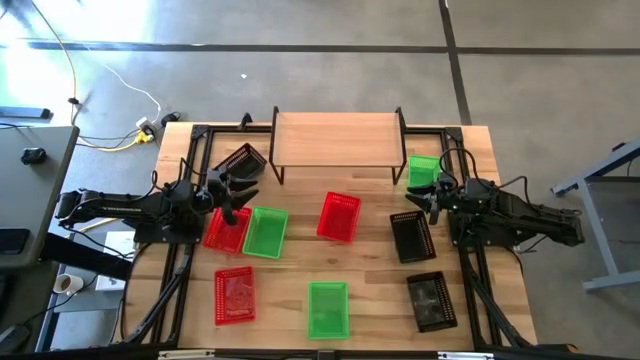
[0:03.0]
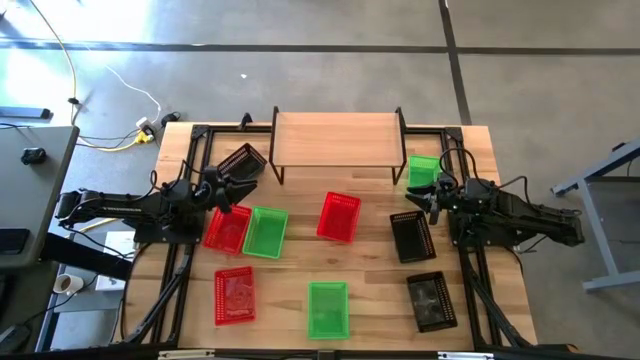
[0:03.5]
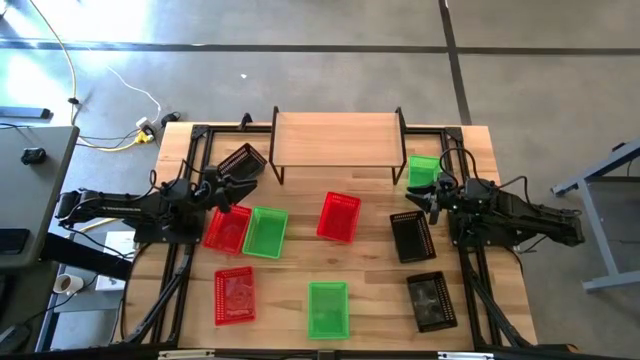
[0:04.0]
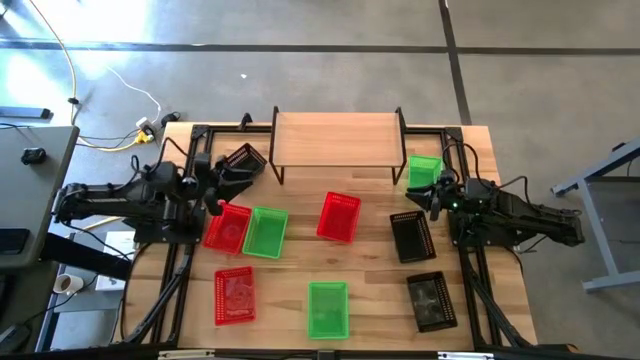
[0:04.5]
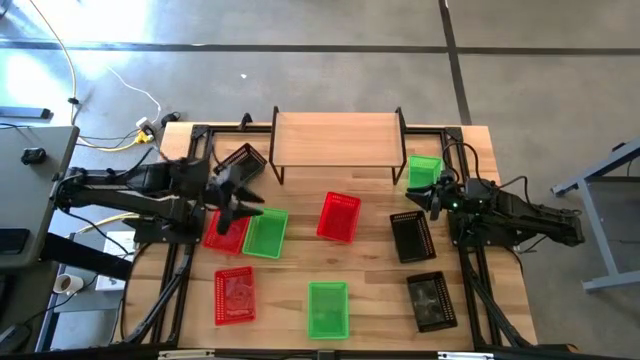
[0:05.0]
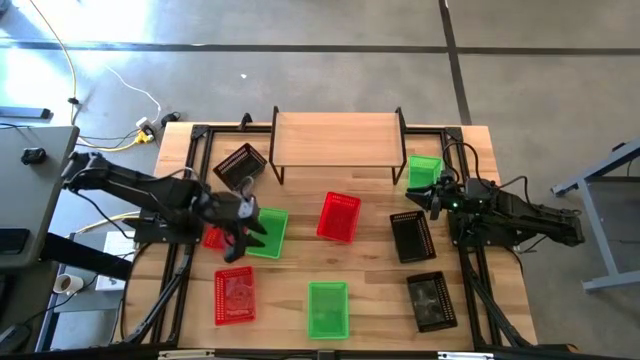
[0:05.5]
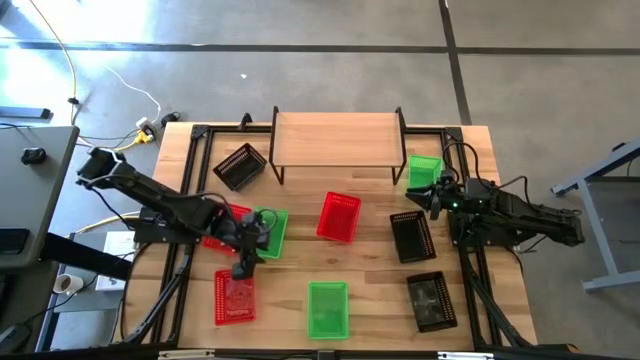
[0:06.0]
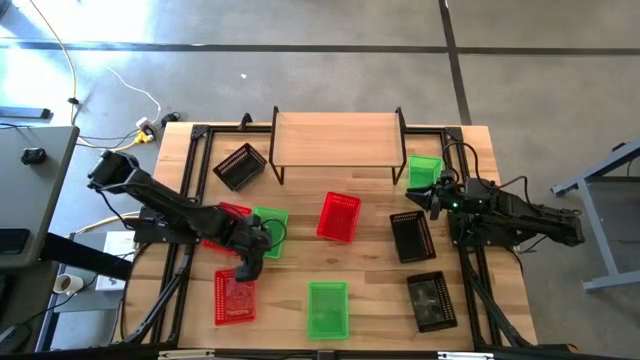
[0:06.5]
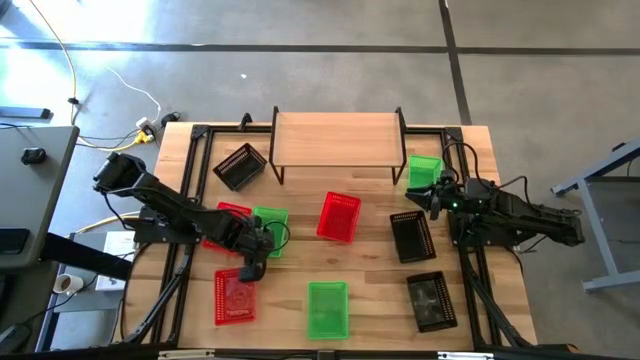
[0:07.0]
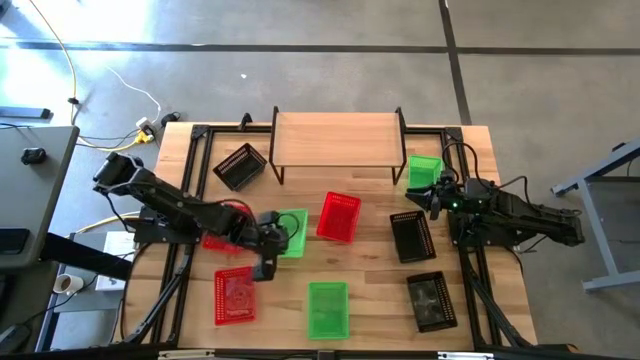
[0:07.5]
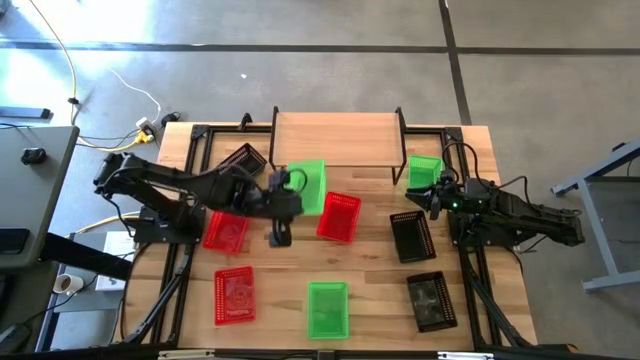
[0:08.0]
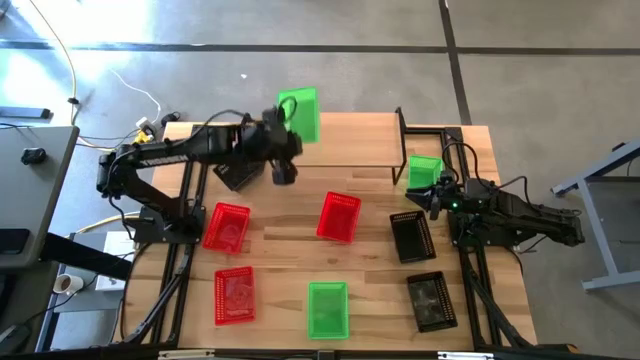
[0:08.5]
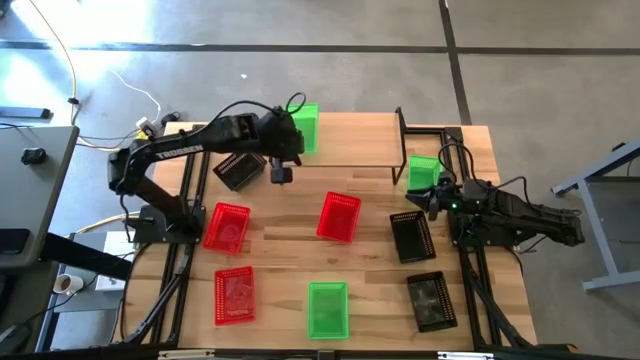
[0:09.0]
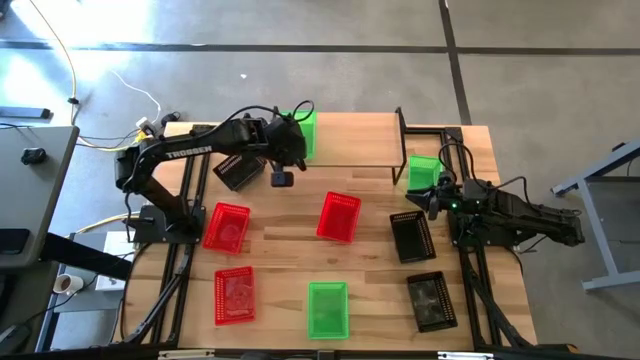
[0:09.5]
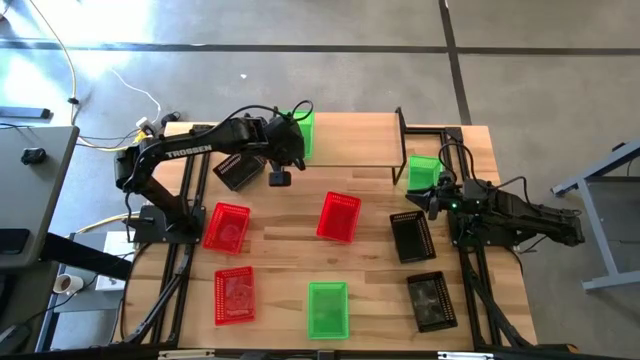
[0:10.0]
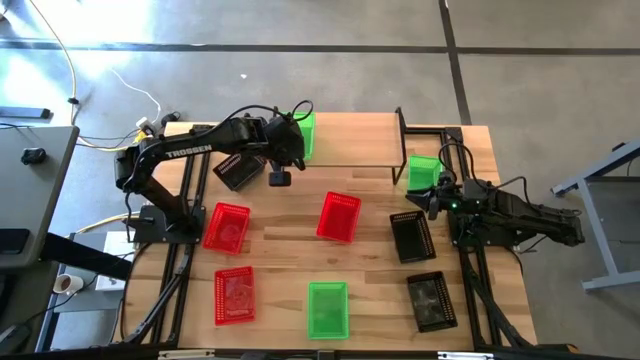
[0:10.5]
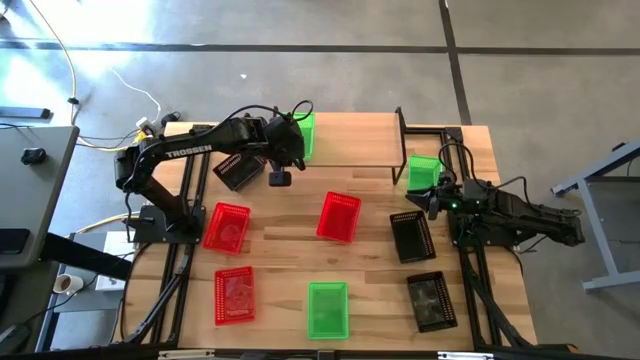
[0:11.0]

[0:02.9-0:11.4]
Task: Stack baskets on shelf by color
Put the middle left green bin on the shelf

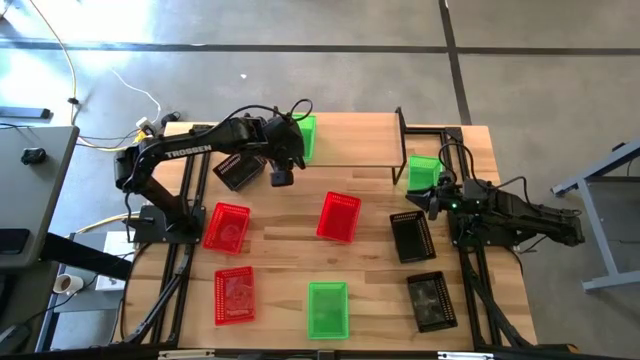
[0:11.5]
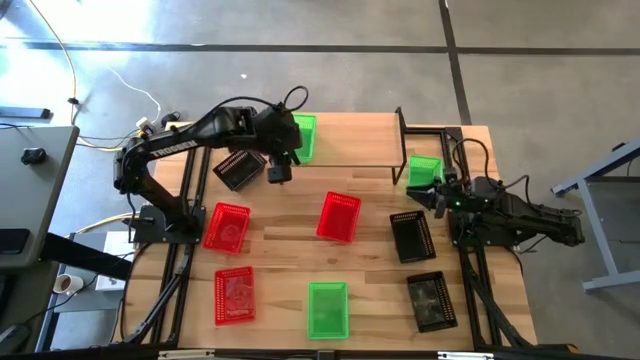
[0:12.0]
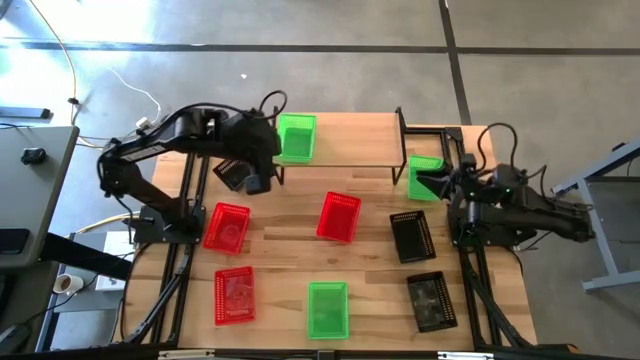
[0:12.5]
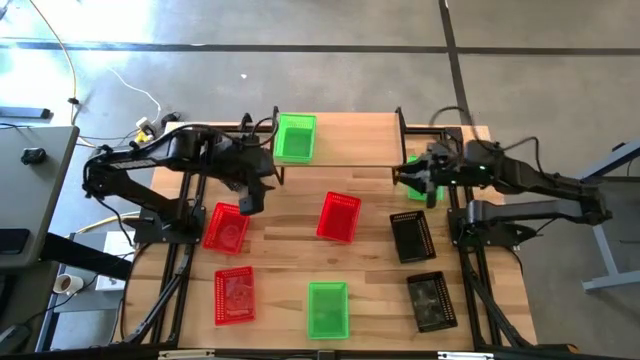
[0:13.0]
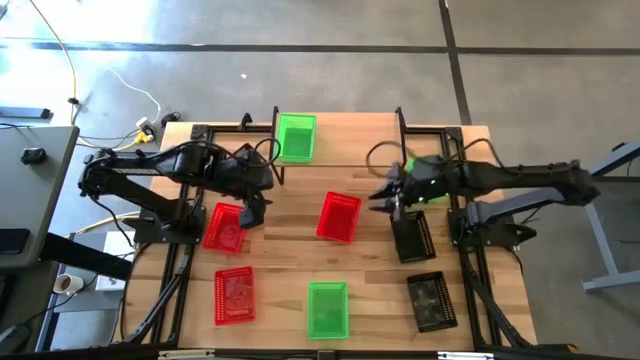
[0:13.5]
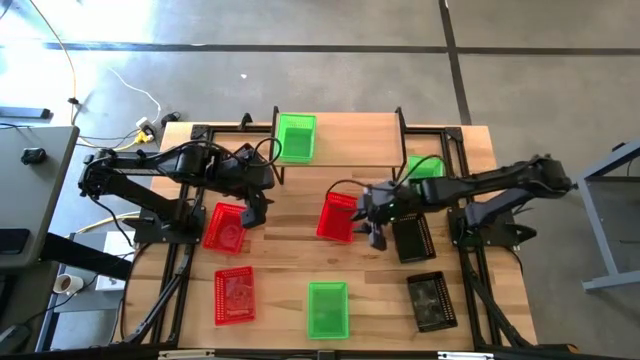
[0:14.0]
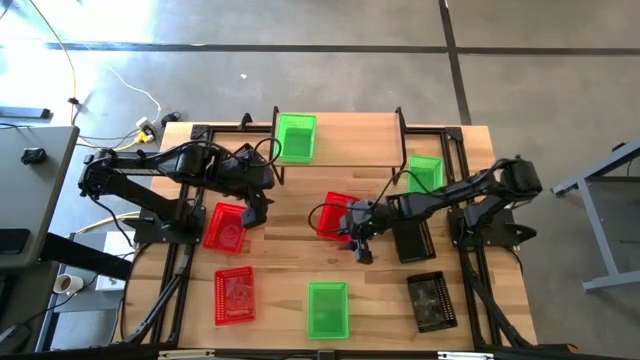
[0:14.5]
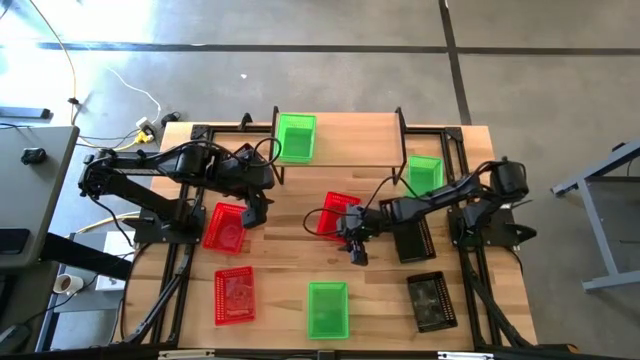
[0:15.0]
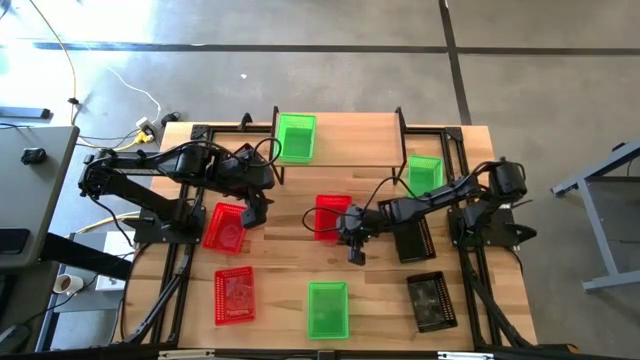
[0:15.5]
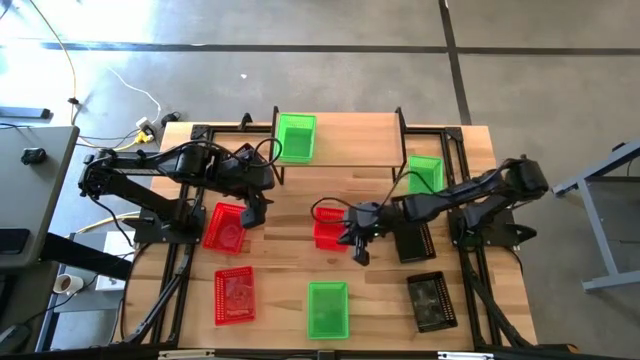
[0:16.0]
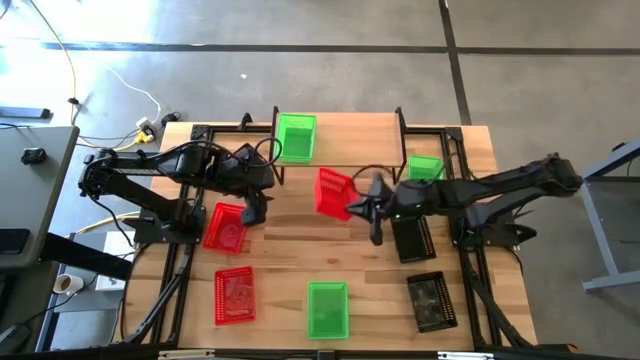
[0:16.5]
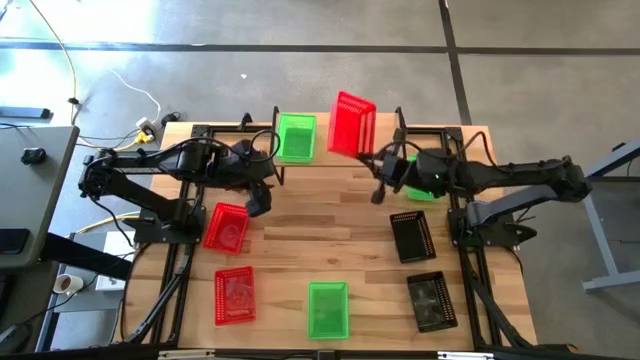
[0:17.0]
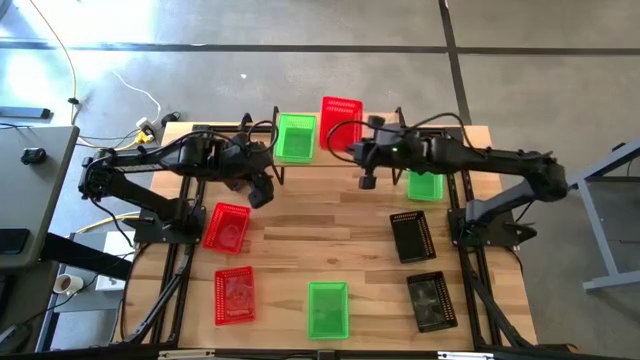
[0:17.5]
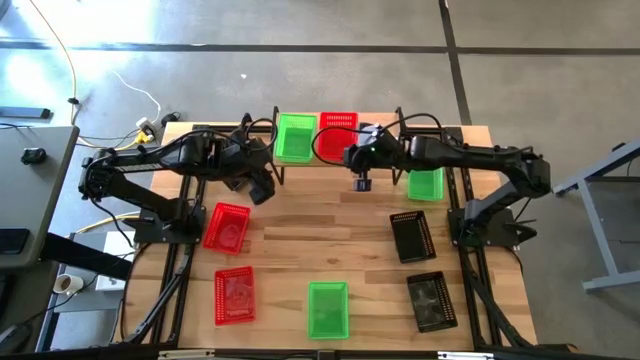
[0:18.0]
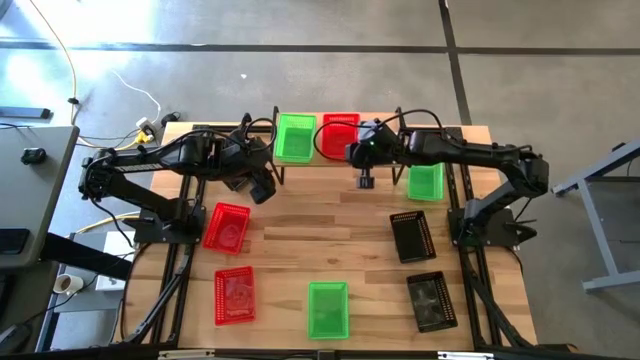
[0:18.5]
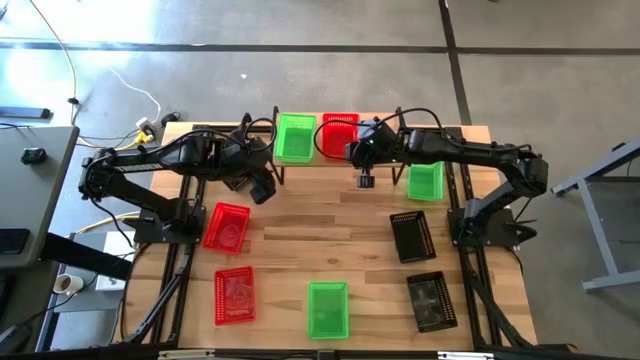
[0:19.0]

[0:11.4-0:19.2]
Put the top right red bin on the shelf

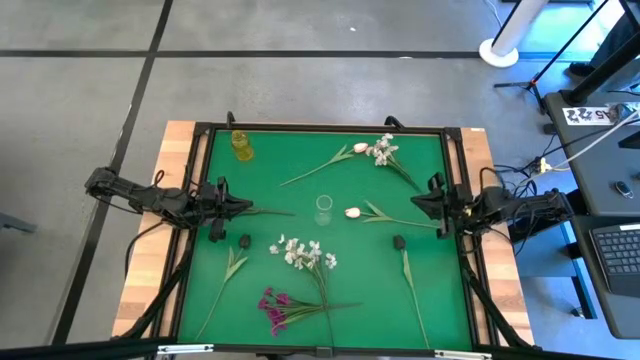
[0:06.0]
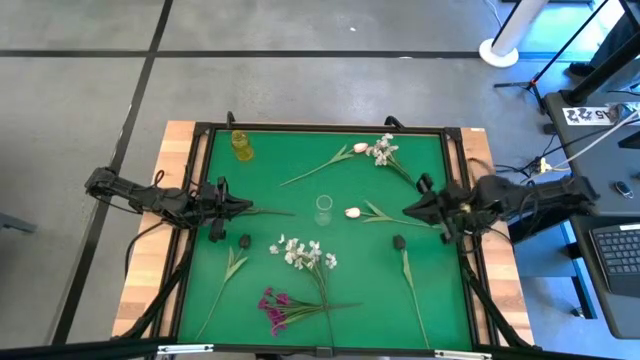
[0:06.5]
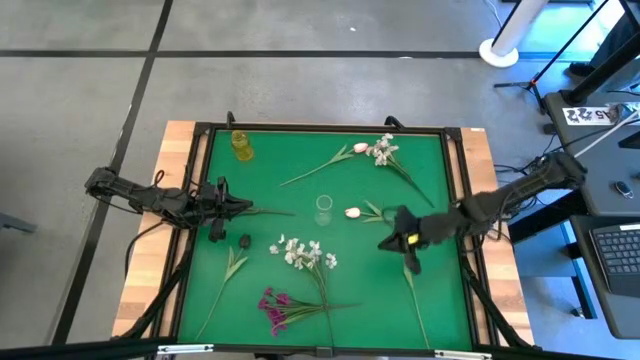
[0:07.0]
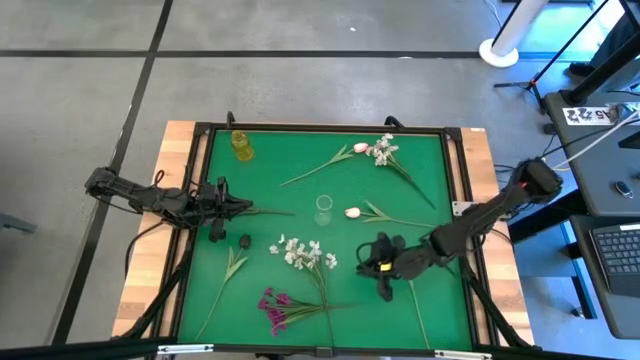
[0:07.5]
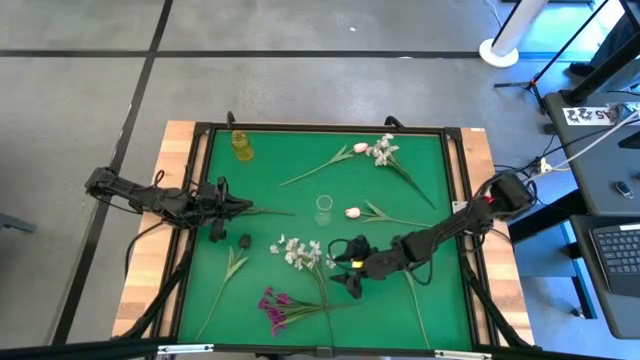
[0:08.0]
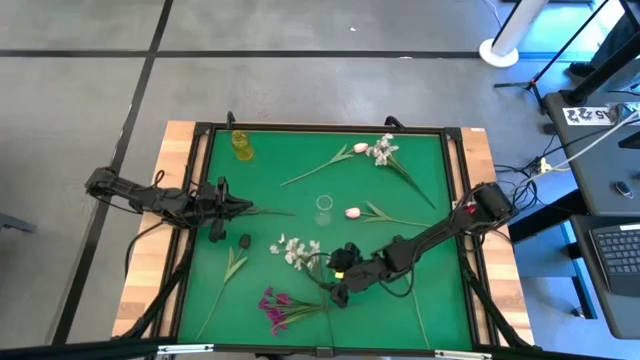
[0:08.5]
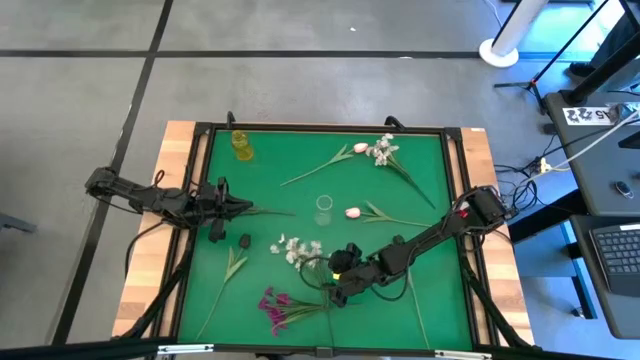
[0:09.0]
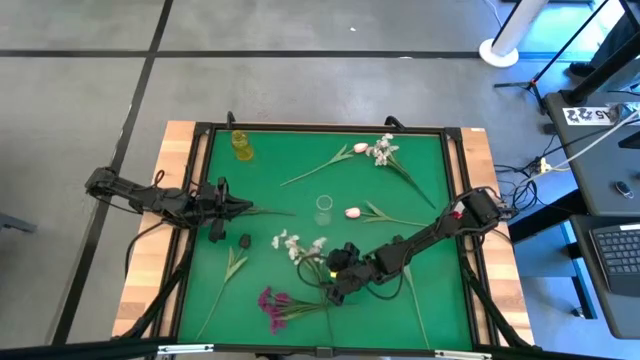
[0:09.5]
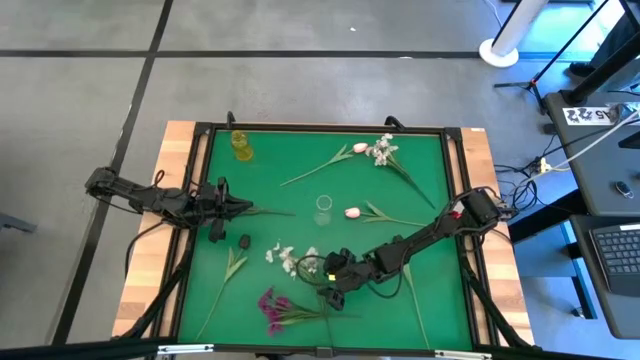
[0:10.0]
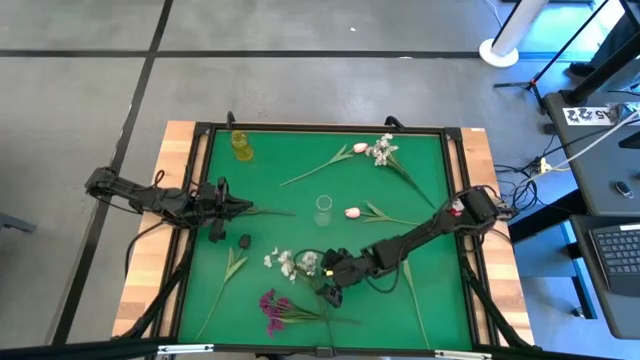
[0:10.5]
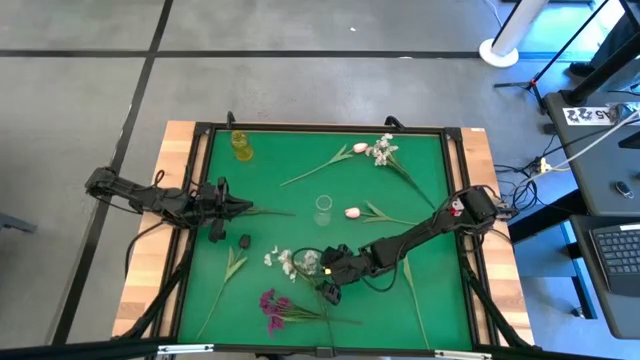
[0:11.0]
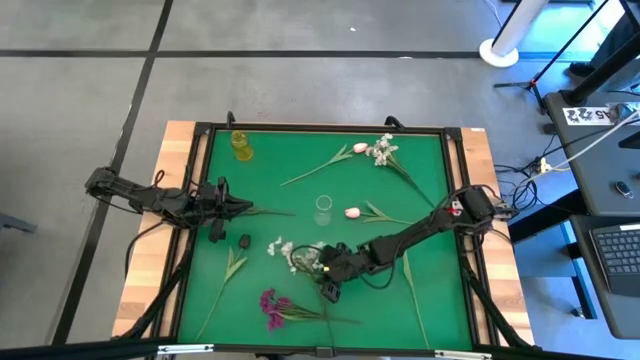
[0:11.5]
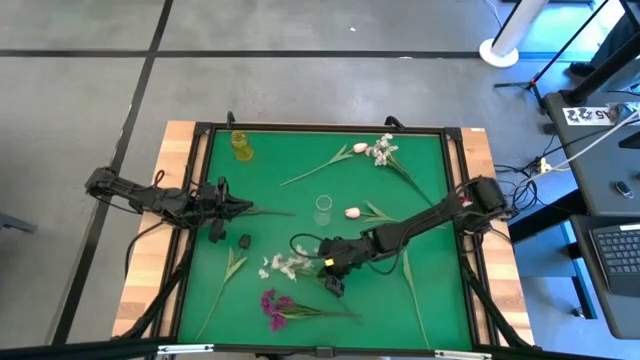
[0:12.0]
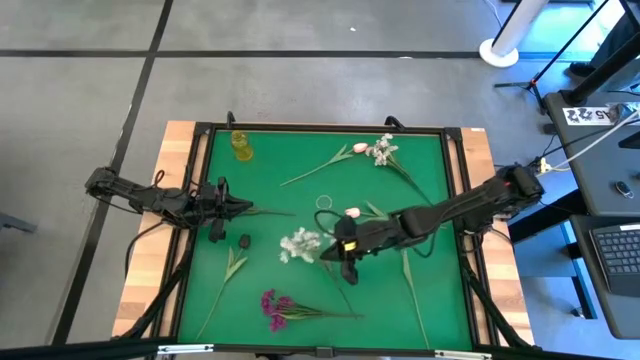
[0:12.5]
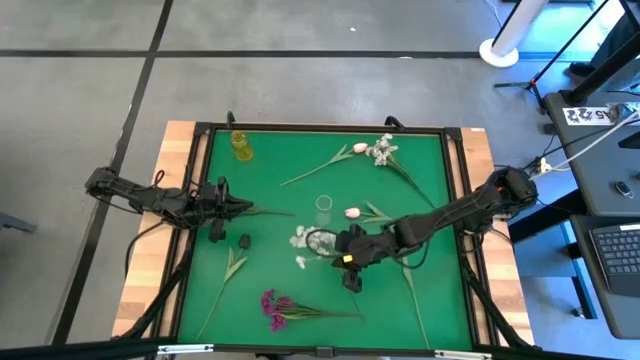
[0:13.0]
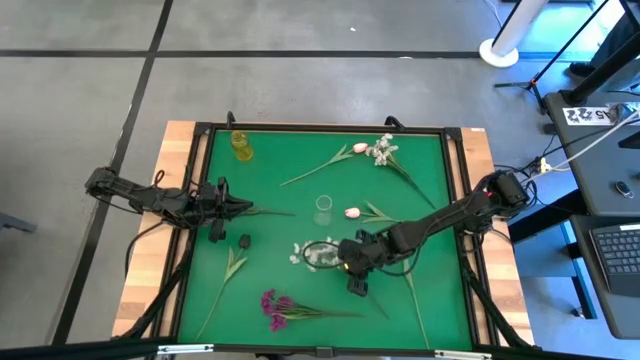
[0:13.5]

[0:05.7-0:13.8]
Task: Sort flowers into vase by color
Put the bottom white flowers into the transparent vase
